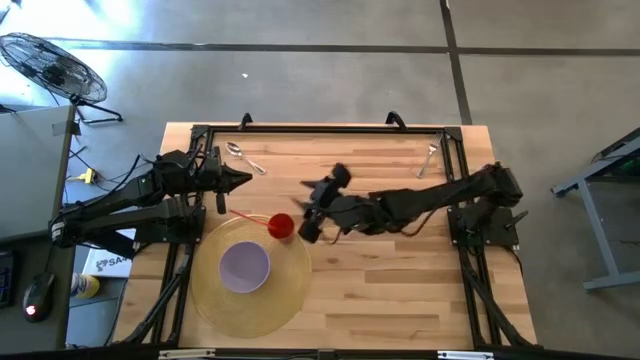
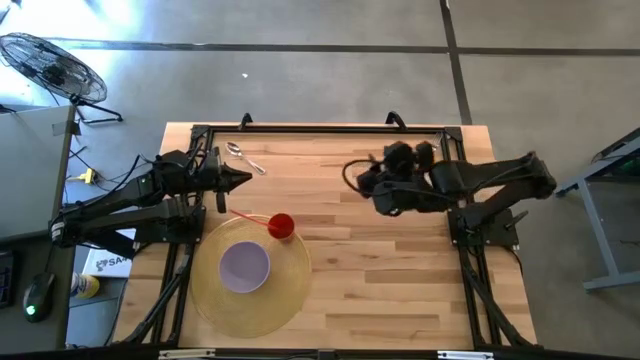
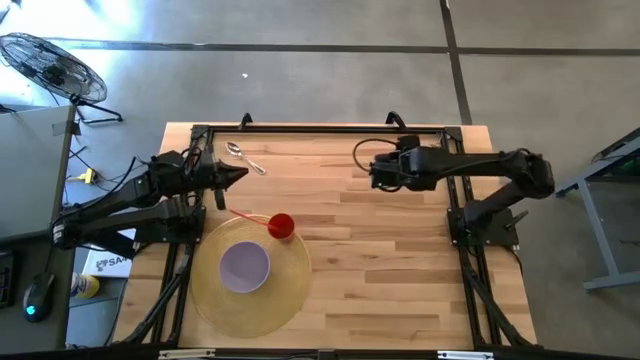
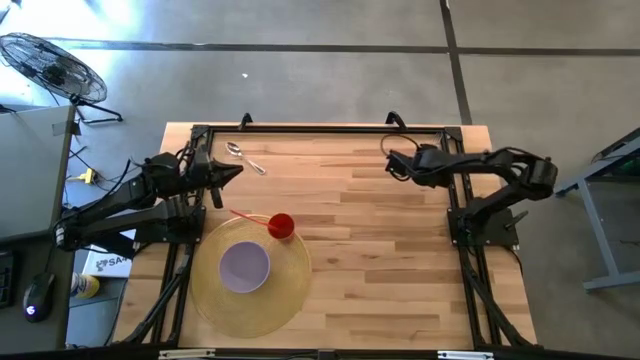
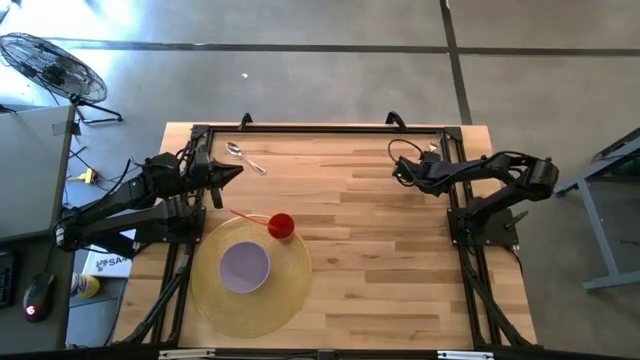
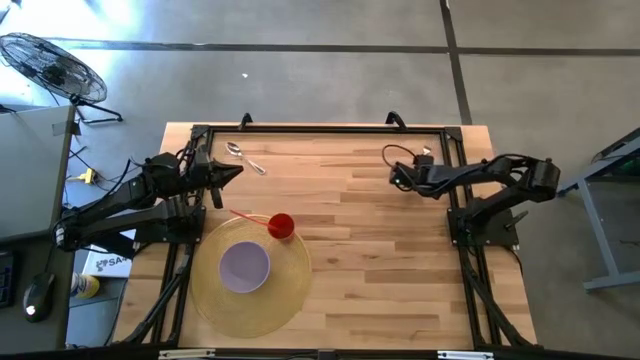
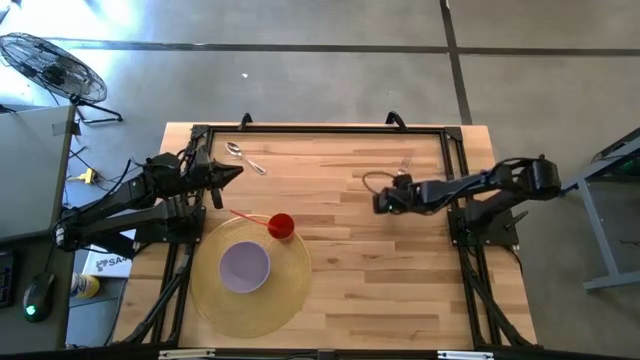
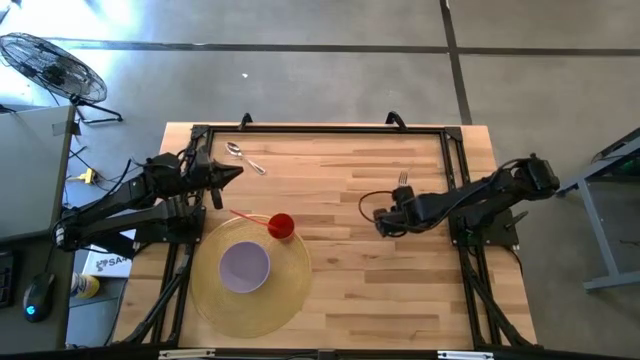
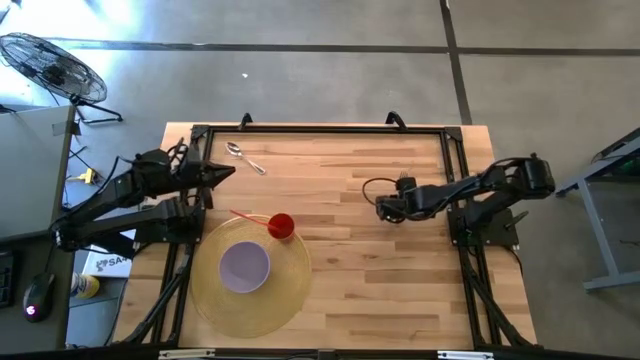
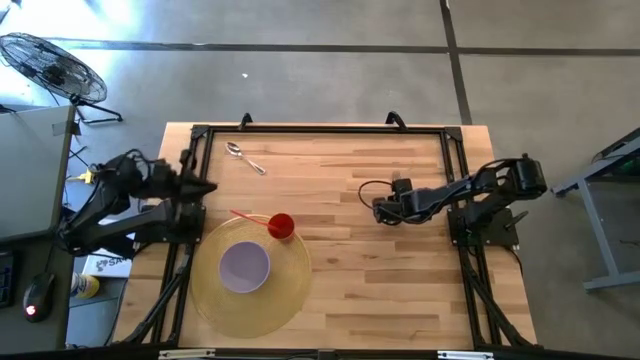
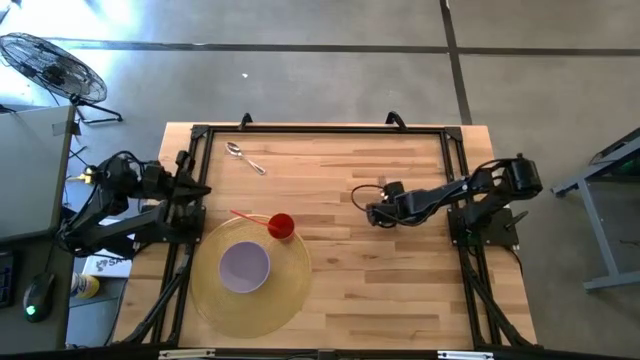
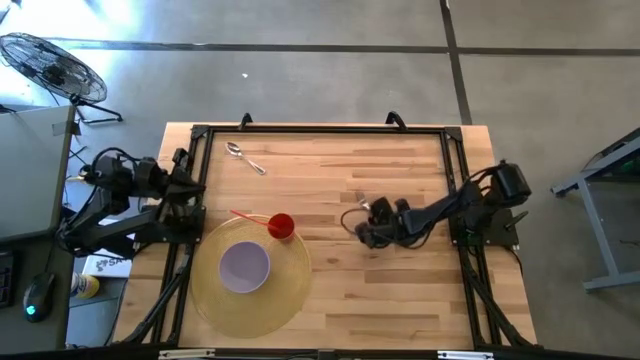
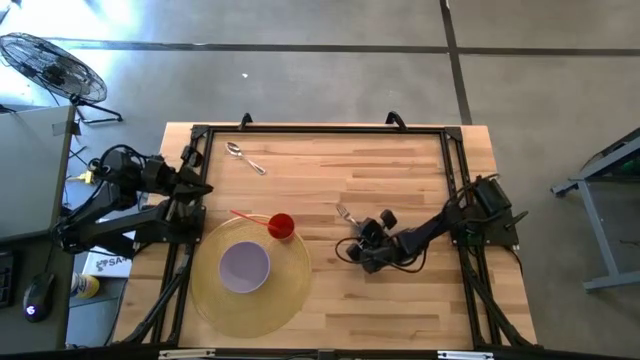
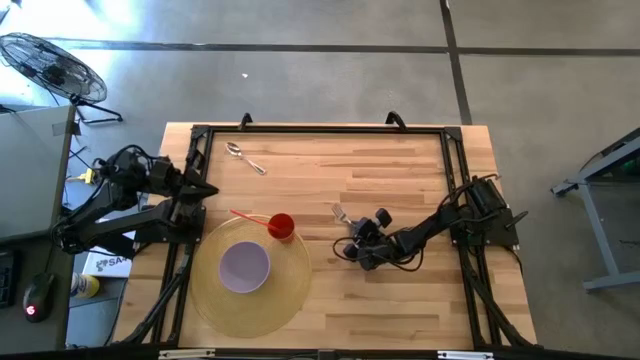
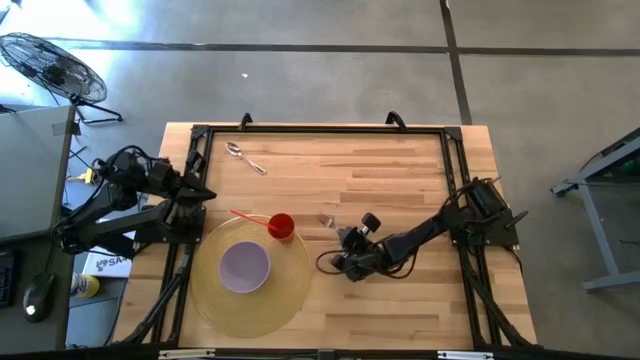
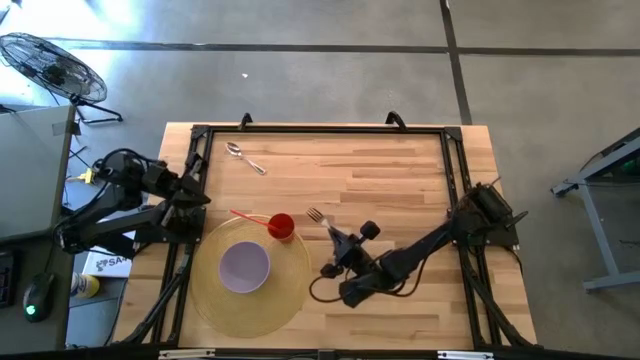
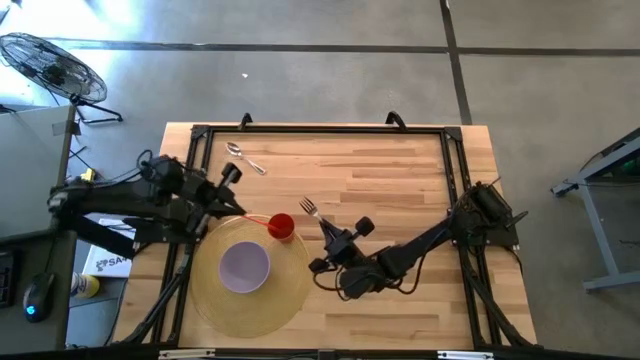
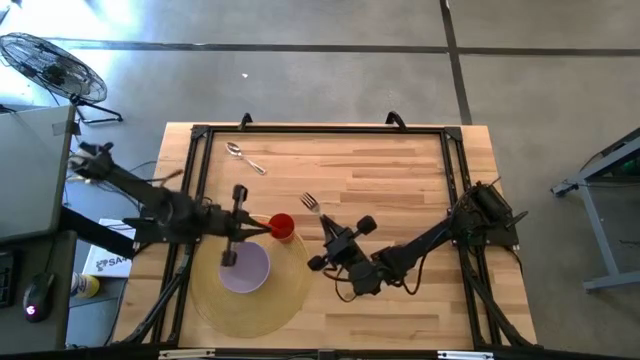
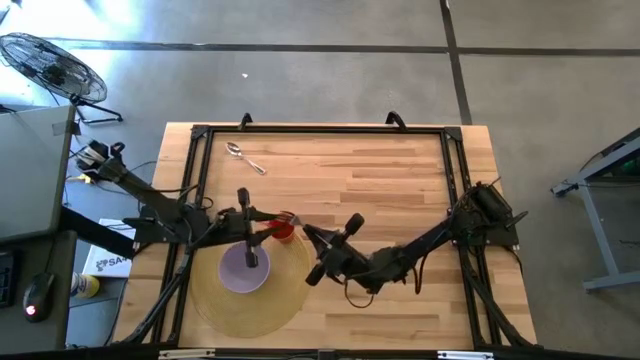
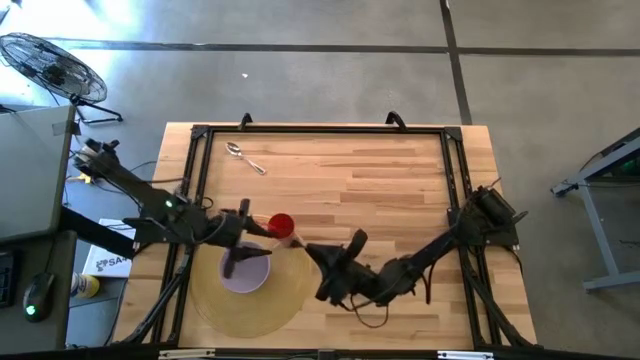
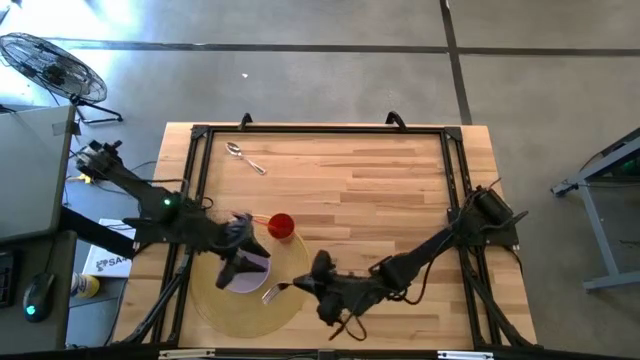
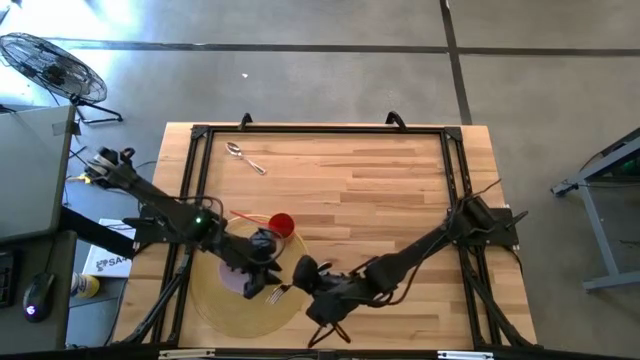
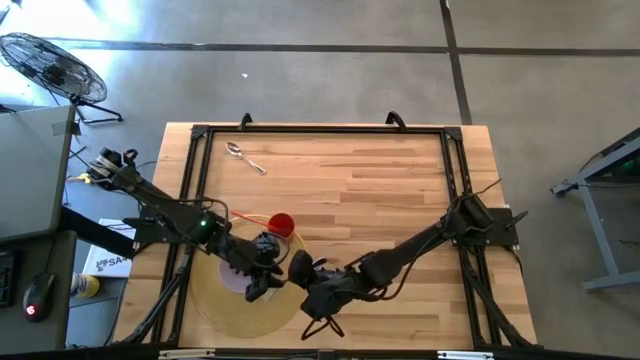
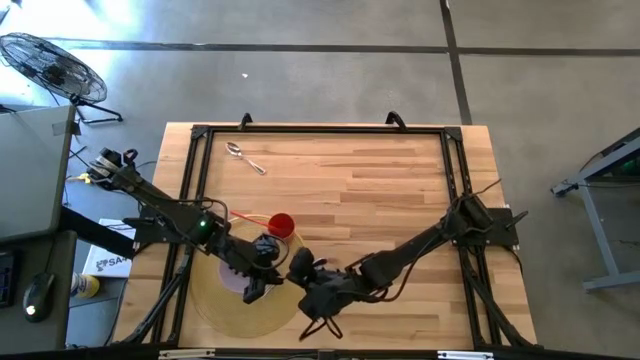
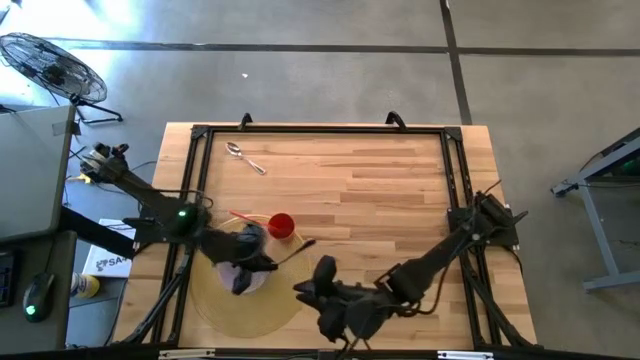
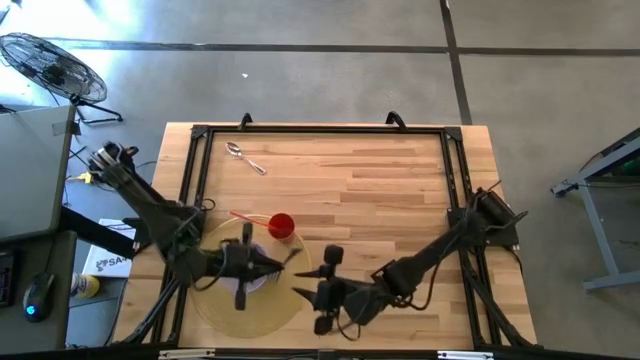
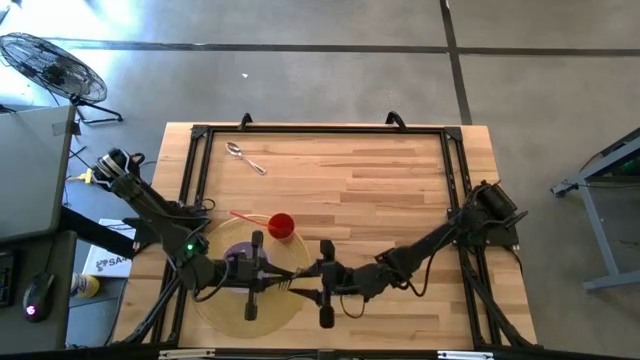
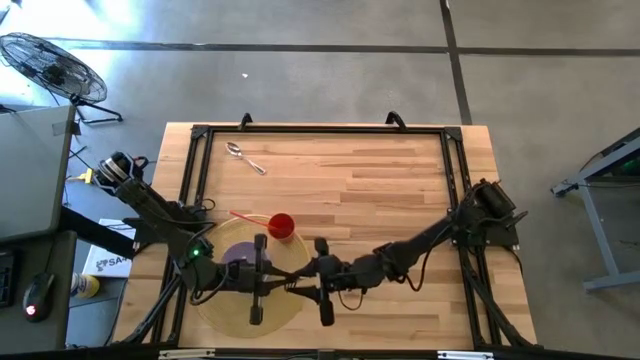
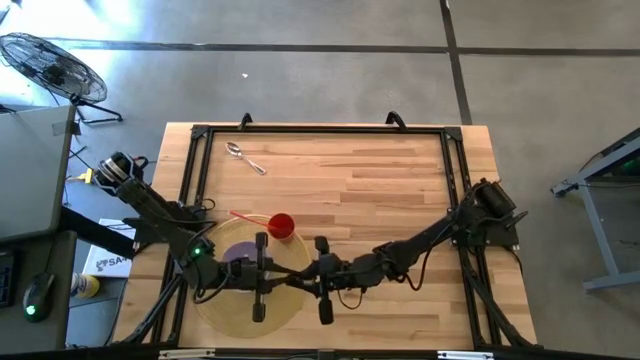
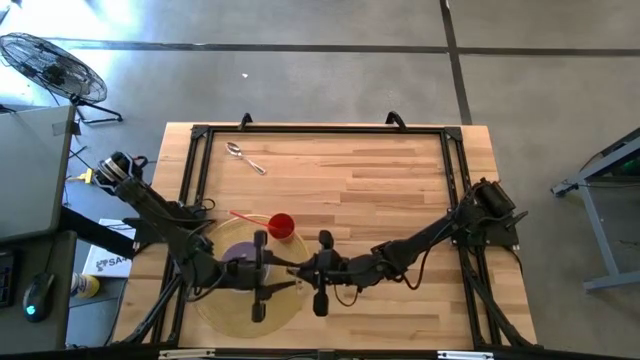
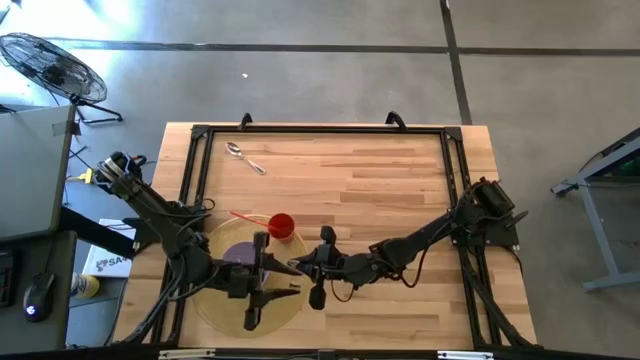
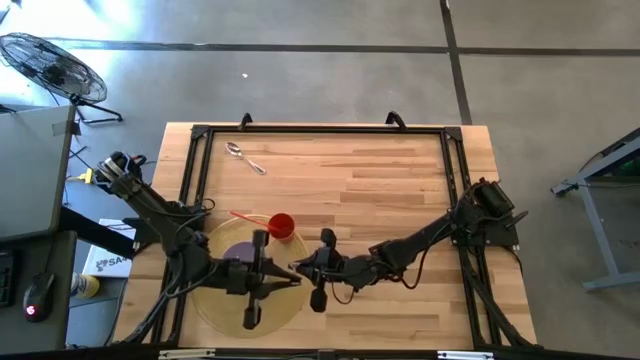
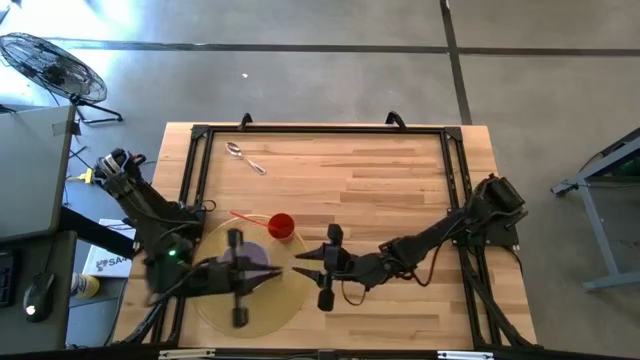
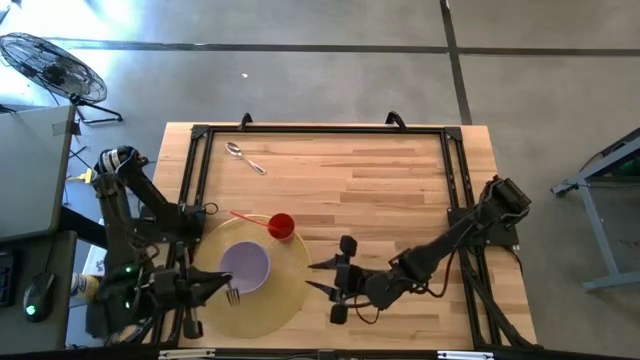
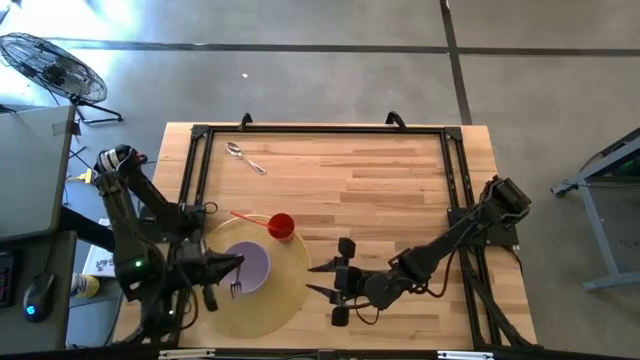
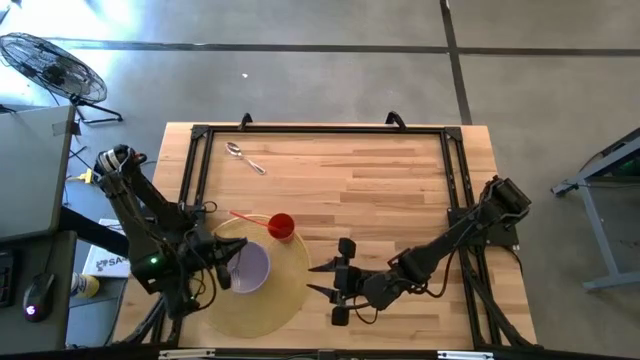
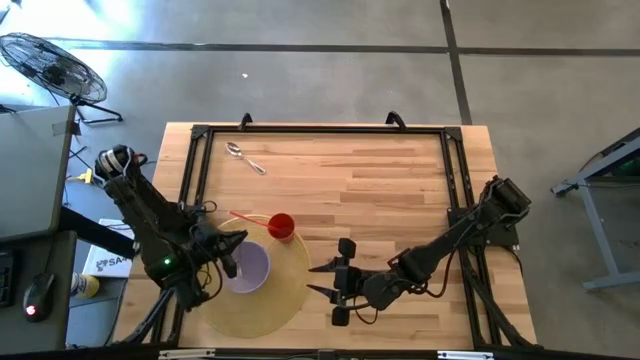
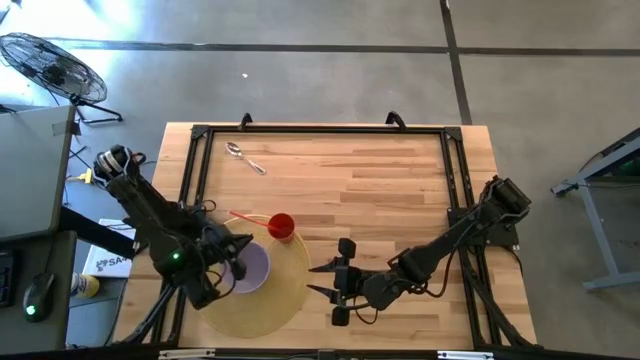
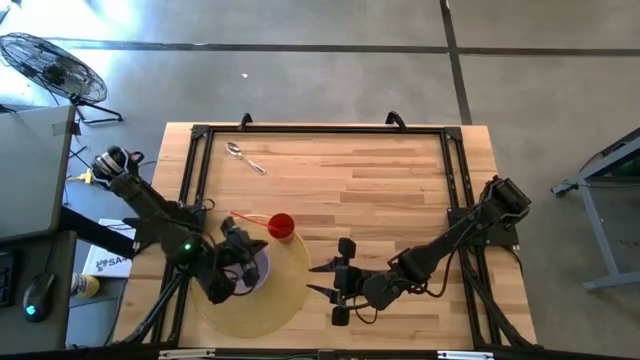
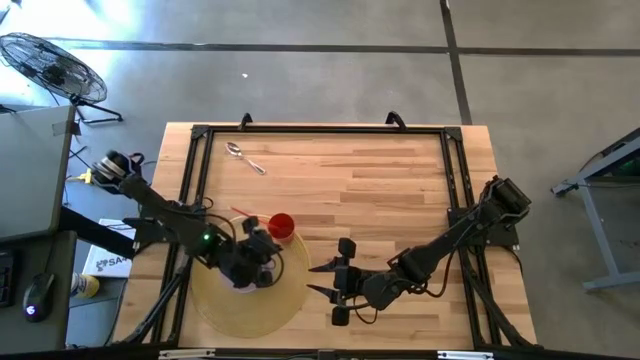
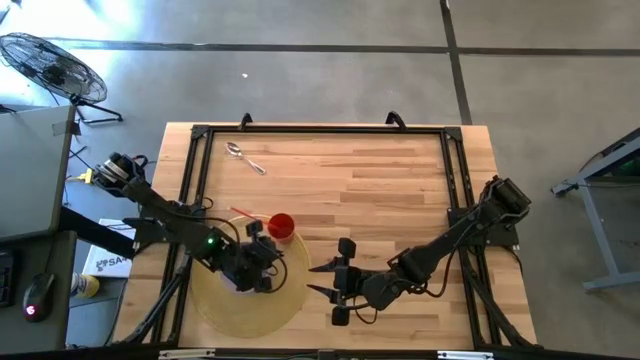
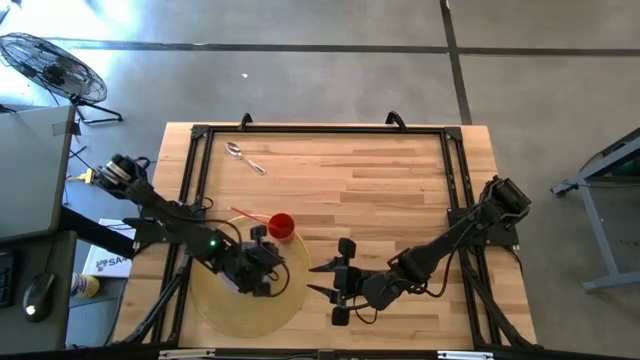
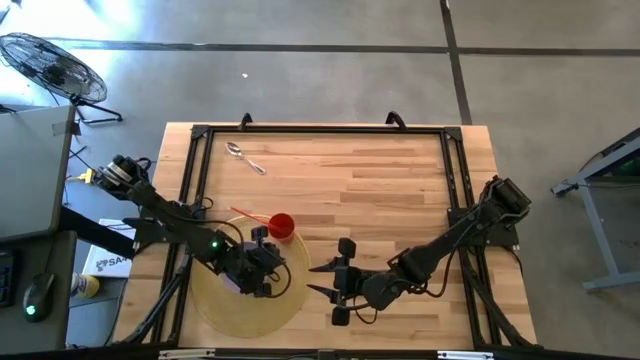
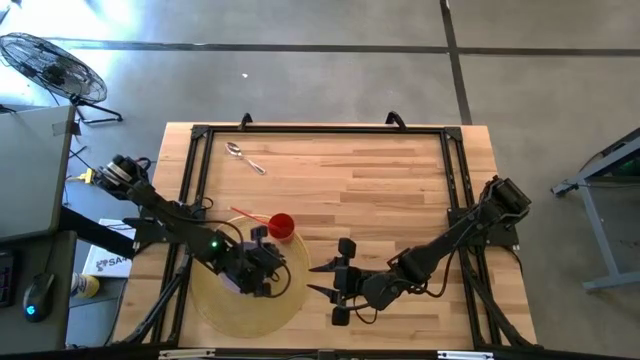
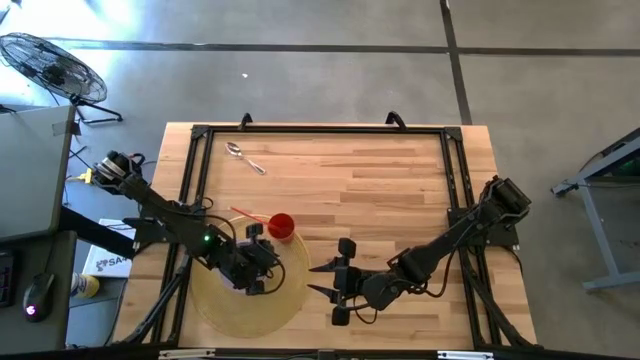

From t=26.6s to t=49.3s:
Task: Pick & Place Utensil
Put the silver fork into the purple bowl on the brown mat
